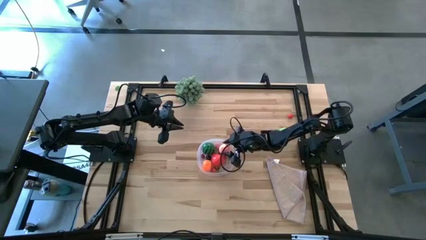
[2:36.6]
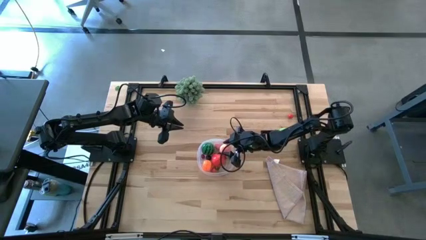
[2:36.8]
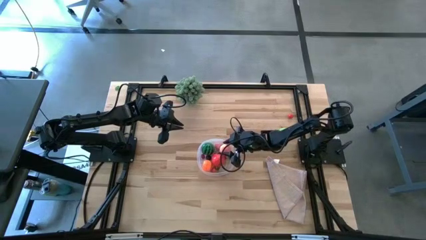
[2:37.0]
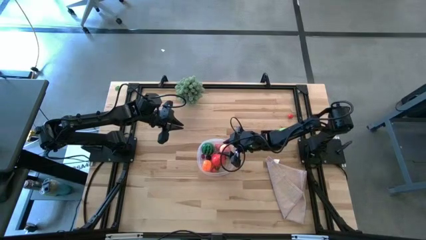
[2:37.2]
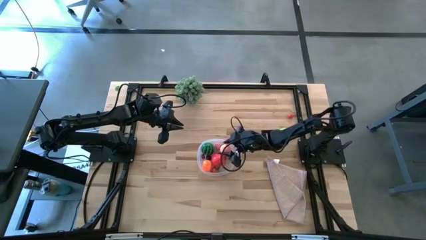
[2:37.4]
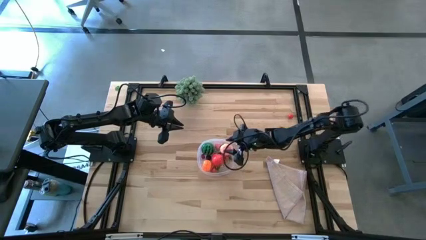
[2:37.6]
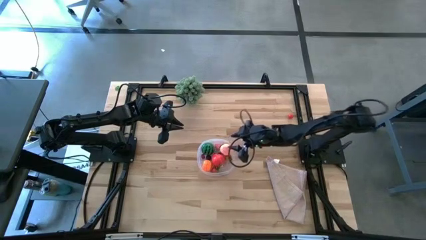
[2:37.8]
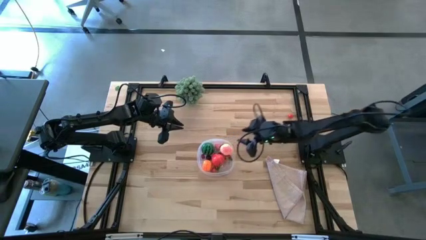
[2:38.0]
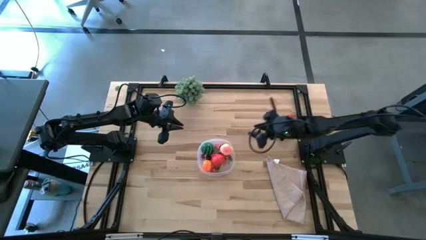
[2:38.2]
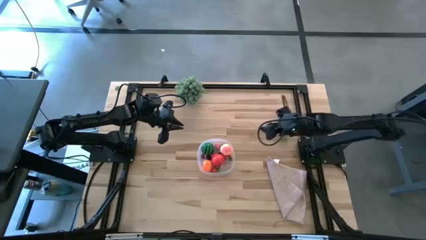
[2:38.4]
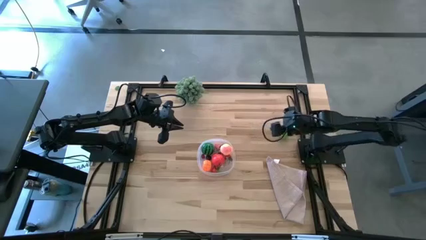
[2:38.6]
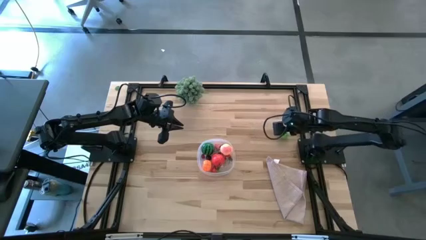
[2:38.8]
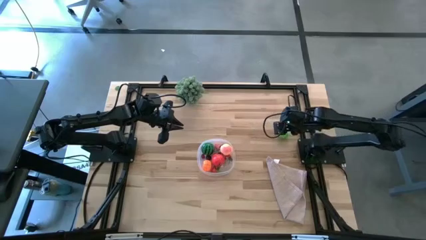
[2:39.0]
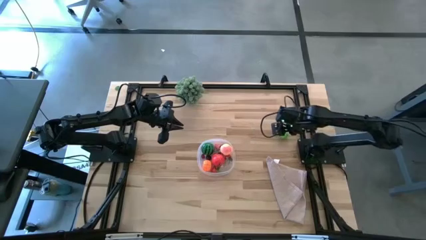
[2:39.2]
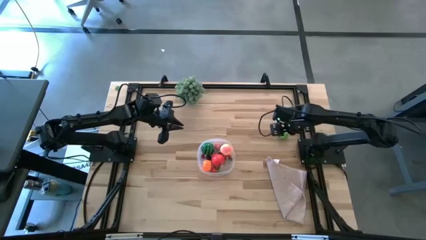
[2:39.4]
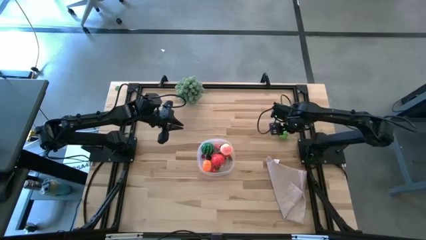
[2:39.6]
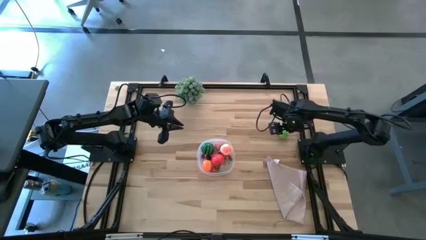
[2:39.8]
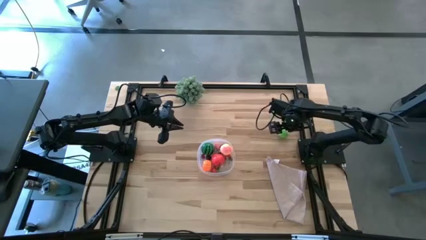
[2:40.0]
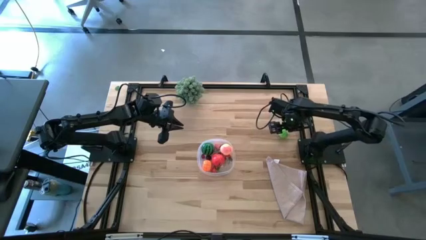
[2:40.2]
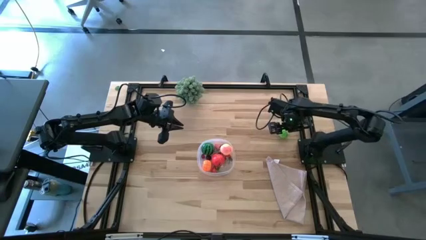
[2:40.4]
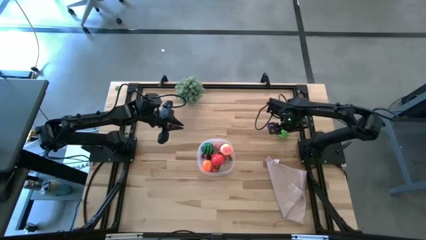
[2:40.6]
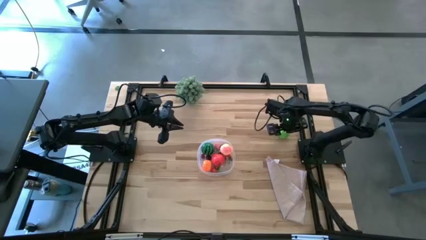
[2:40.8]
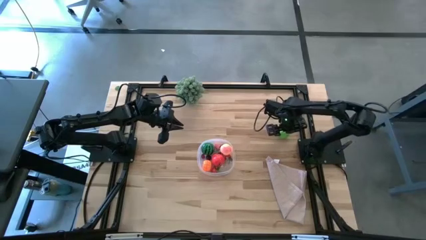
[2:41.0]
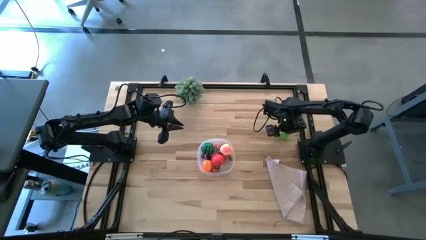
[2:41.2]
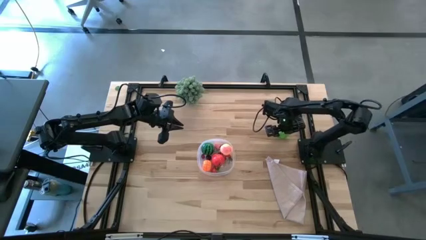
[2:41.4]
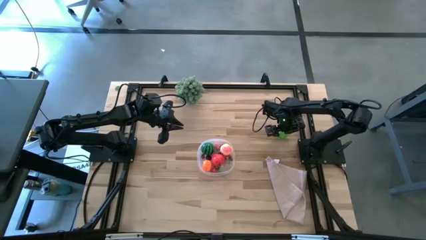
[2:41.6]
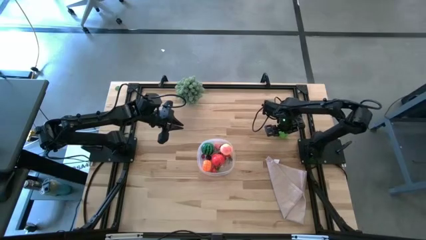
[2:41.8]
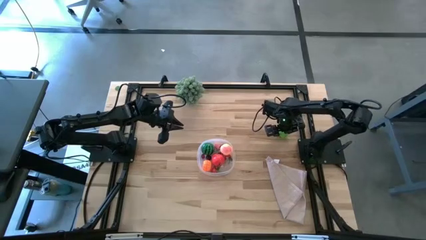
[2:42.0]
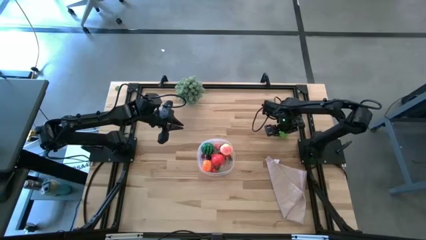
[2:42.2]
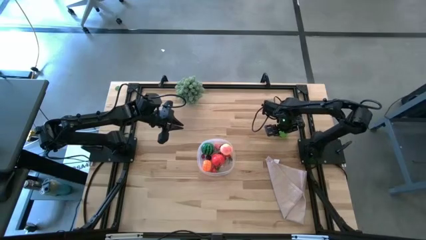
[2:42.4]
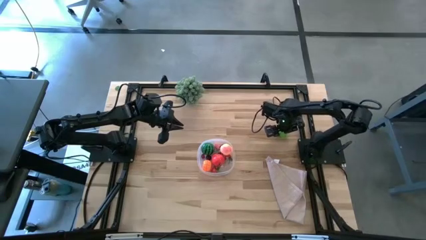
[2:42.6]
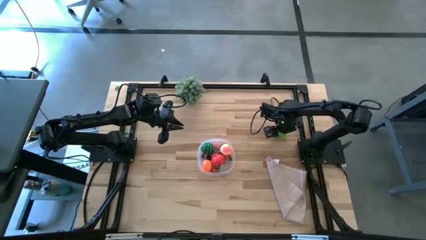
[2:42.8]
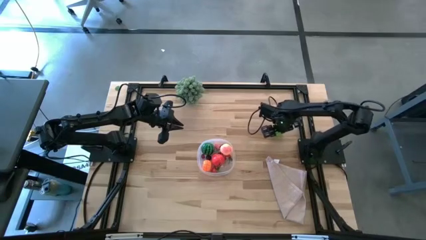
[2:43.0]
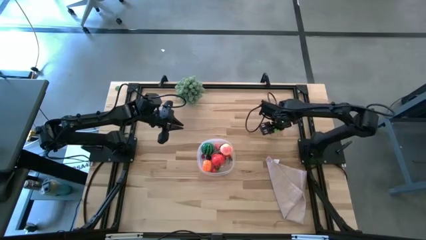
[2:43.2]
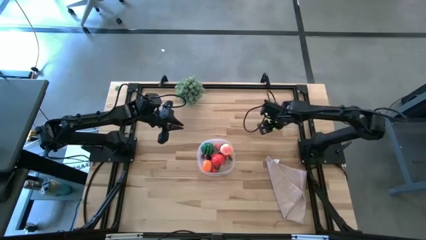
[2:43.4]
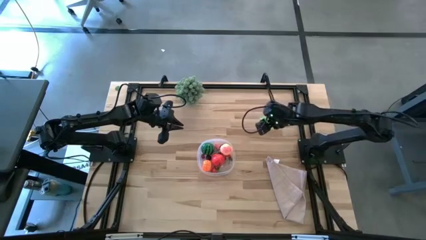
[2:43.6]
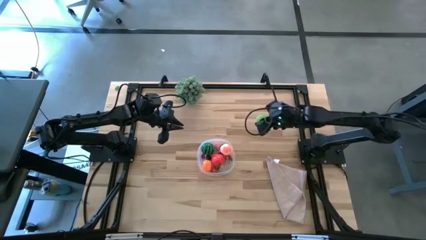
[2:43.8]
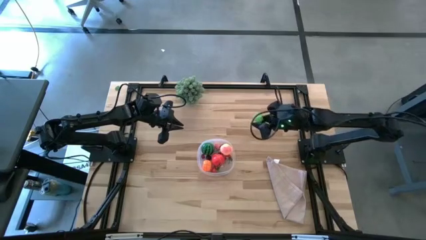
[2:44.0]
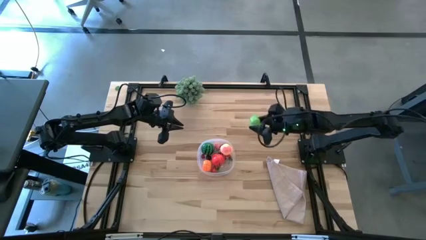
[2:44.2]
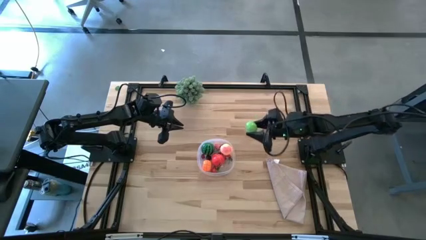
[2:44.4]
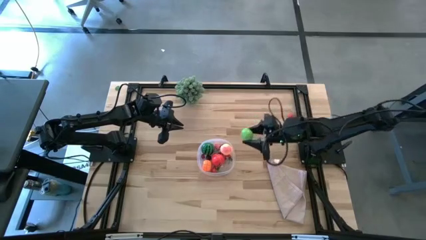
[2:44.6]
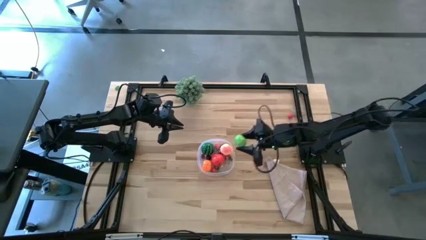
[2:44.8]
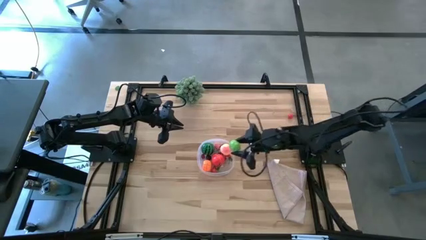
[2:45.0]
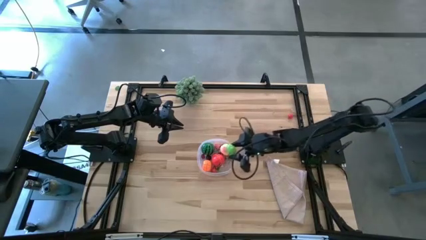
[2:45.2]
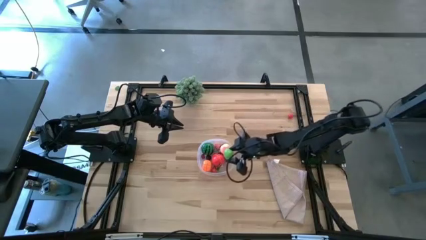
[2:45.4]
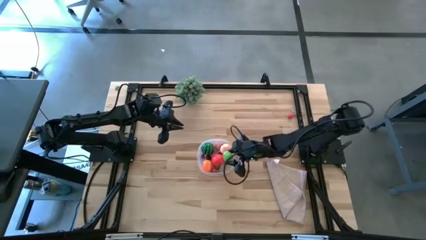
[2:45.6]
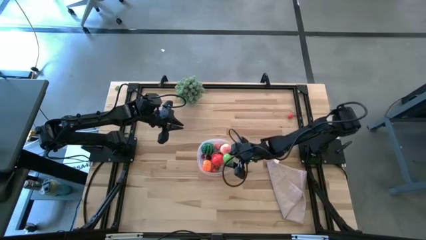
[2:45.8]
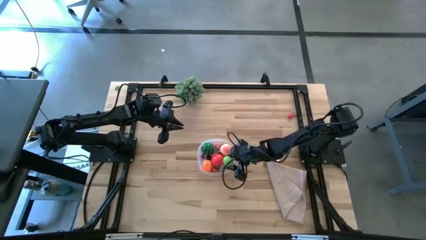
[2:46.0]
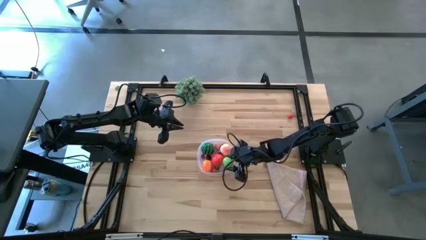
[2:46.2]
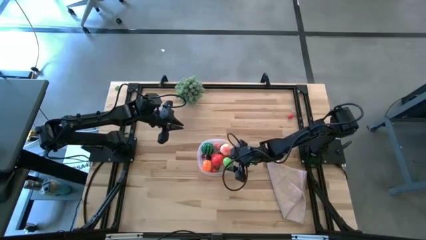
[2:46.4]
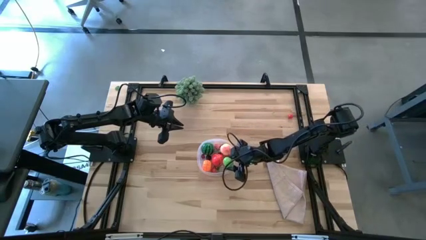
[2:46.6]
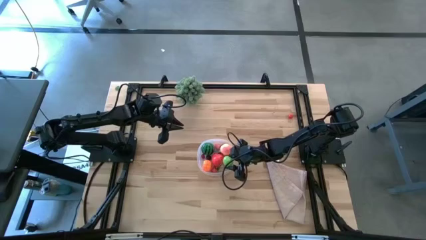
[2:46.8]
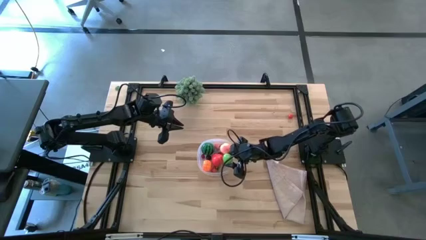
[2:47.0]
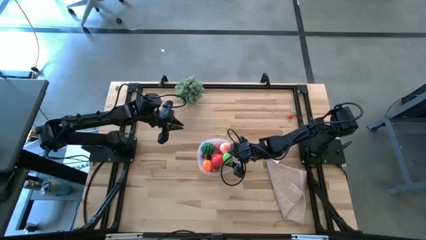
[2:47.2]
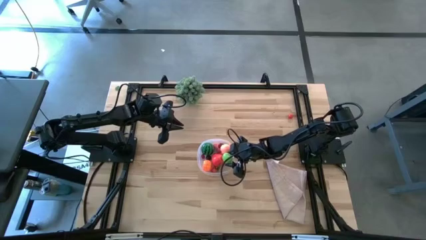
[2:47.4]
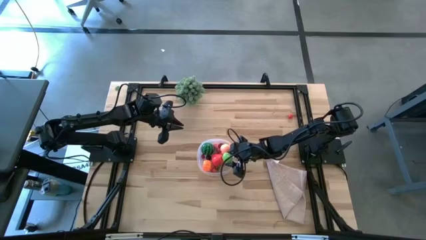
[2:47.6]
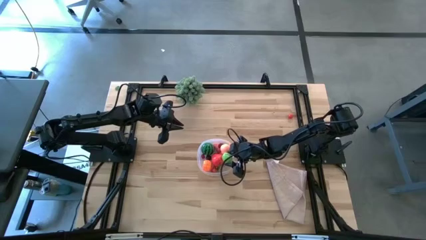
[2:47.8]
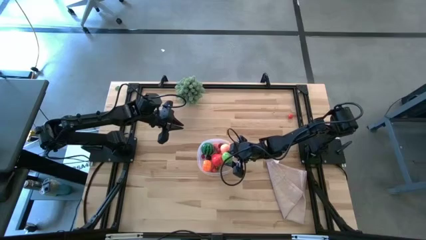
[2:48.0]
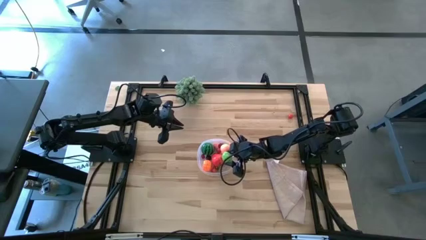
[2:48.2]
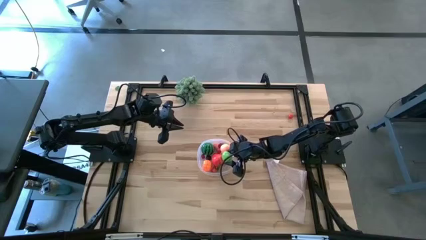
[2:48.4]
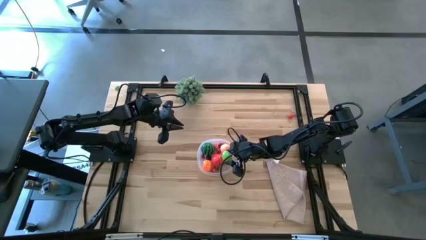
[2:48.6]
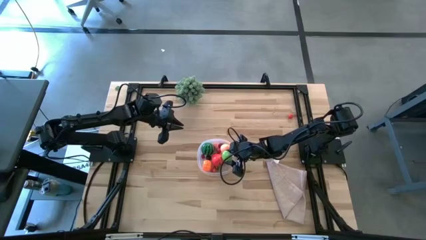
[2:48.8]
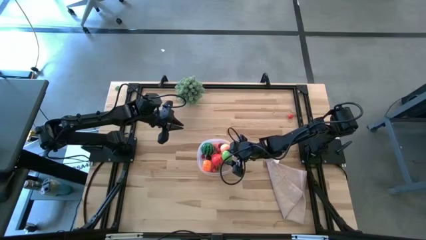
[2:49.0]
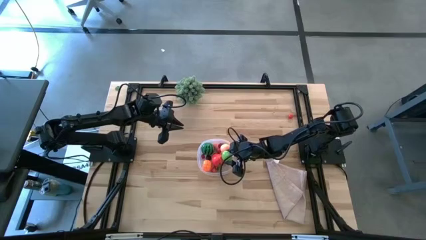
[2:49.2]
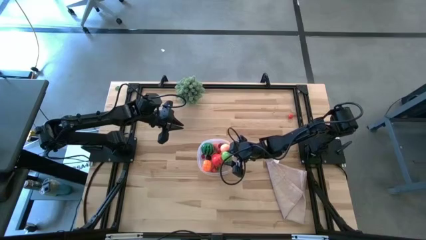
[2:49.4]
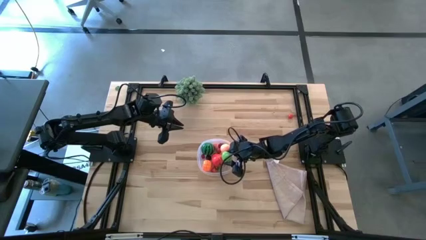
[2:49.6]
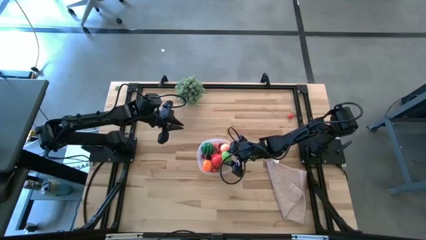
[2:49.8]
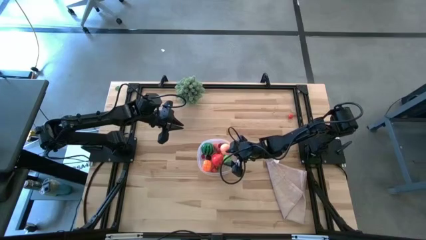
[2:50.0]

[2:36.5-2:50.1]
Task: Pick and placing Produce into tupperware
Put the cabbage into the transparent container

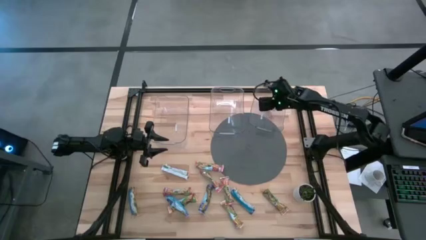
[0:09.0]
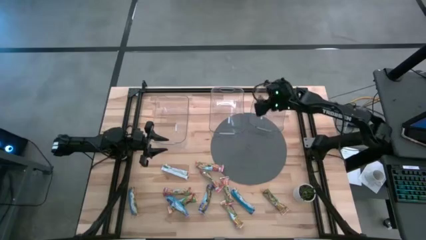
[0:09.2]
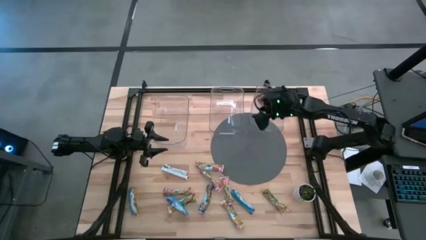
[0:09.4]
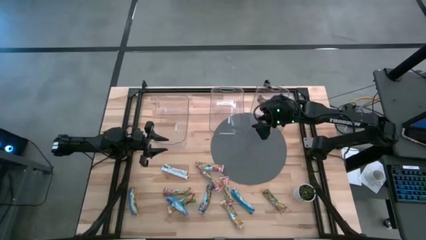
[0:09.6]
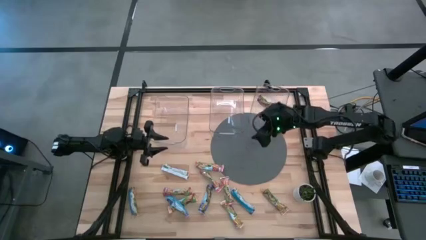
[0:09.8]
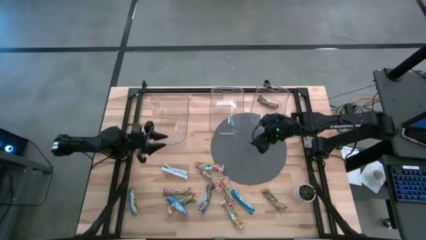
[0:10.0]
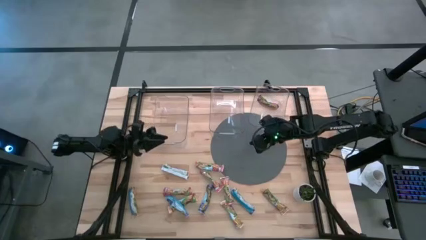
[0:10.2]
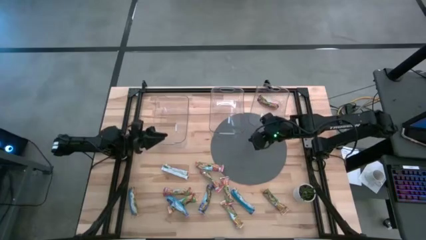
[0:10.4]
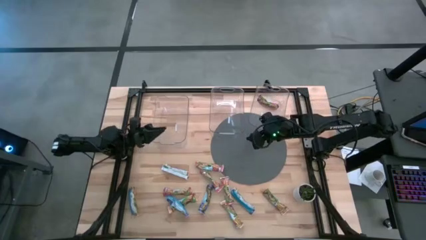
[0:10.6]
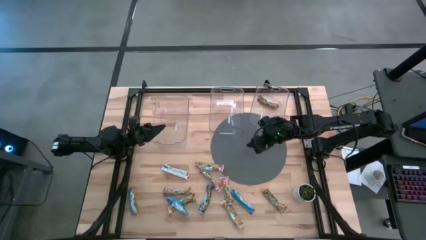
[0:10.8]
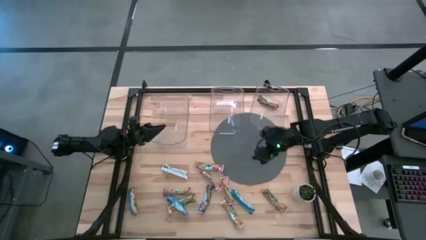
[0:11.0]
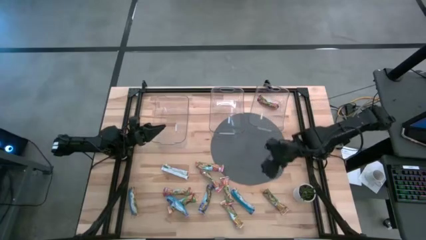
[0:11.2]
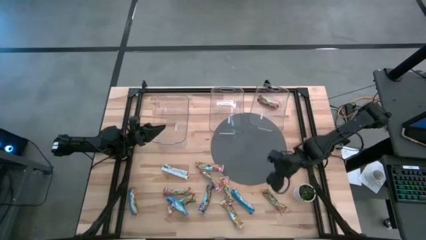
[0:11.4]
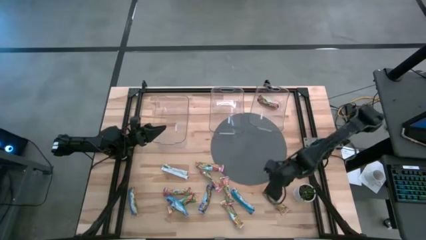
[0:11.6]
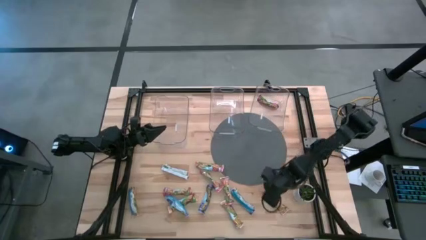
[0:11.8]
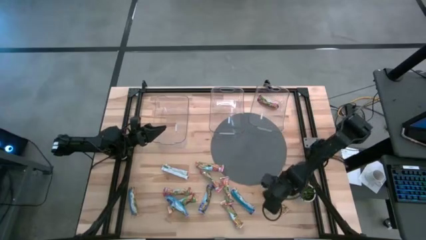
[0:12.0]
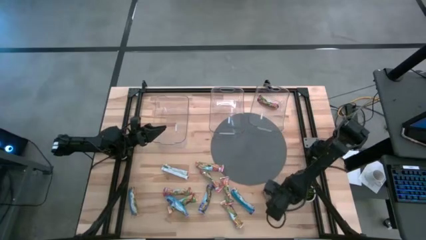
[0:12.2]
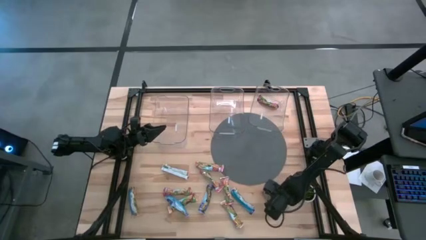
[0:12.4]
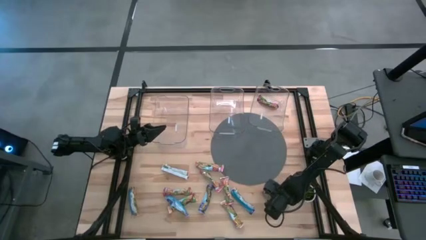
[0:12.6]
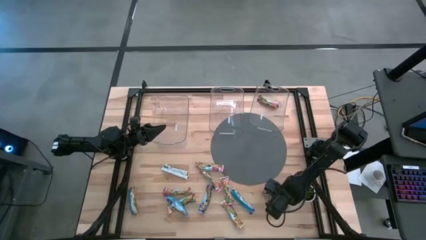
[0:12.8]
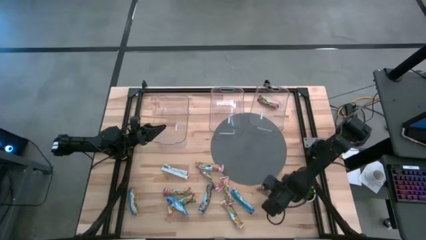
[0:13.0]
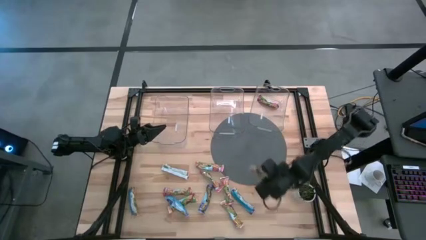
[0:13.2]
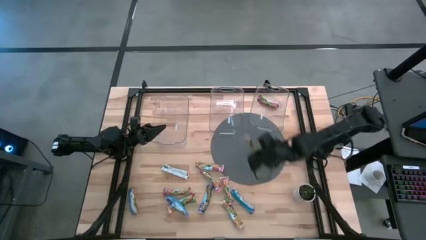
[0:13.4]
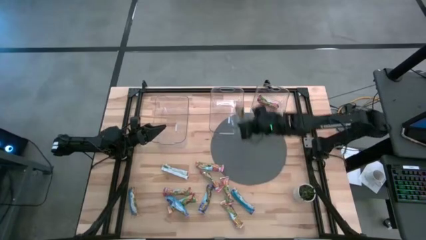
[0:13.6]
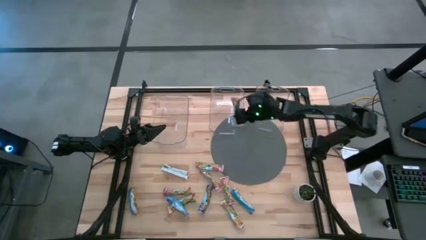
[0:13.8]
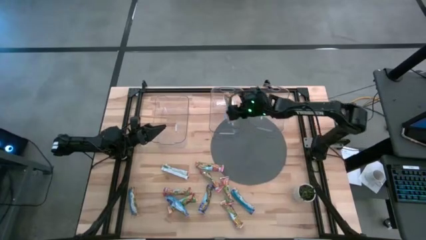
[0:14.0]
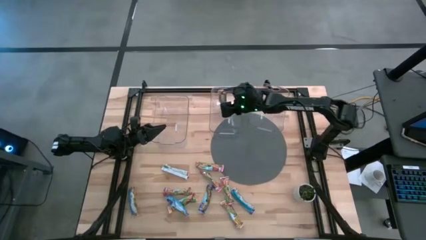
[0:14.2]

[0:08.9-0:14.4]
Task: Pick and place Granola Bars by type
Put the yellow granola bar into the middle transparent bin
